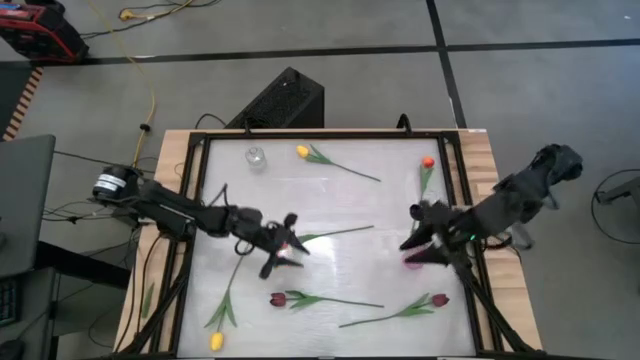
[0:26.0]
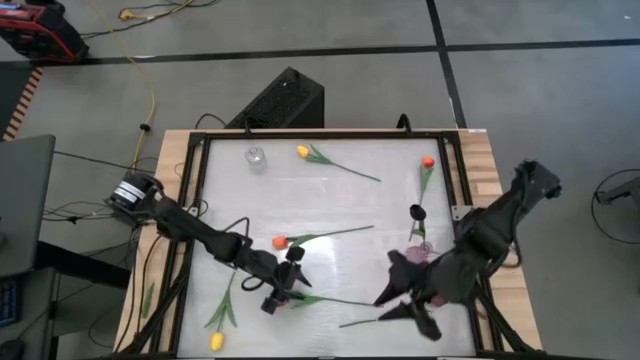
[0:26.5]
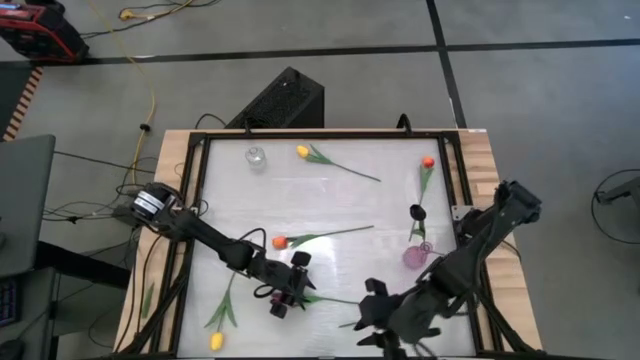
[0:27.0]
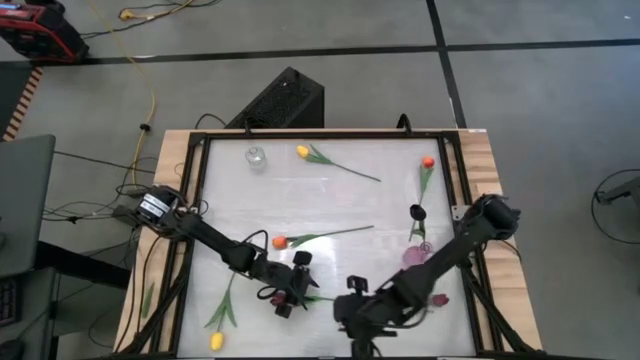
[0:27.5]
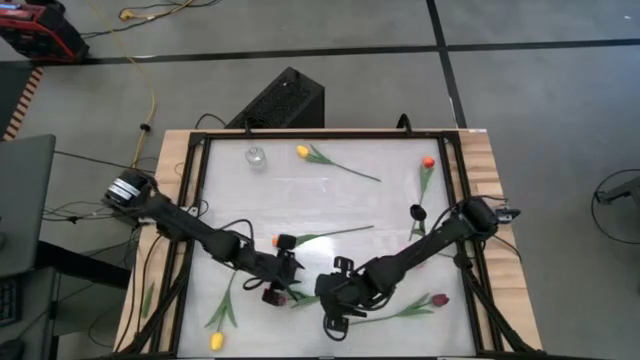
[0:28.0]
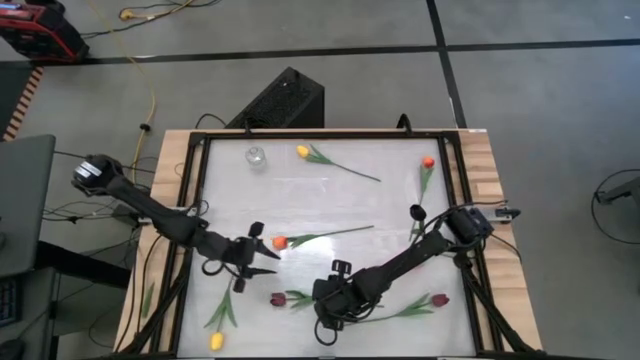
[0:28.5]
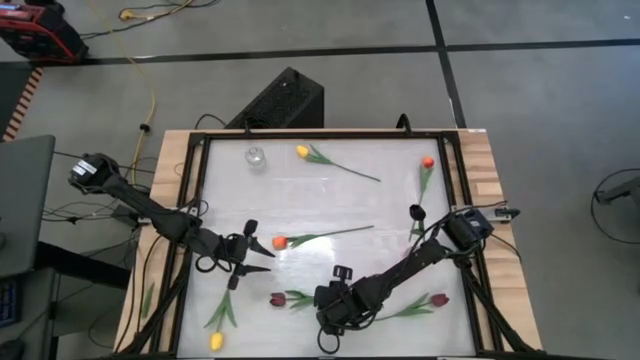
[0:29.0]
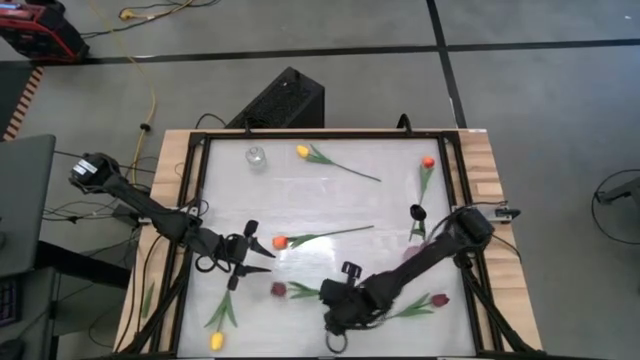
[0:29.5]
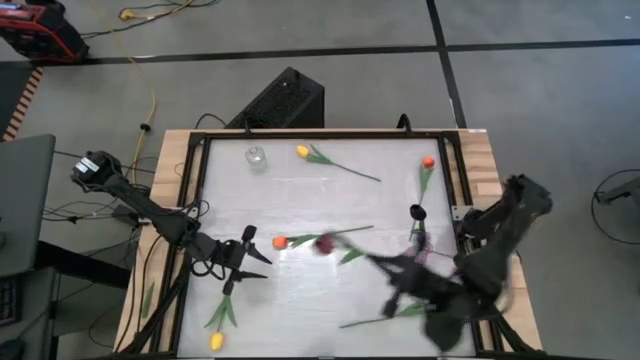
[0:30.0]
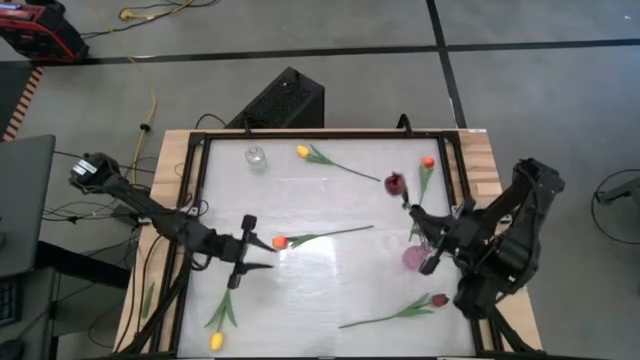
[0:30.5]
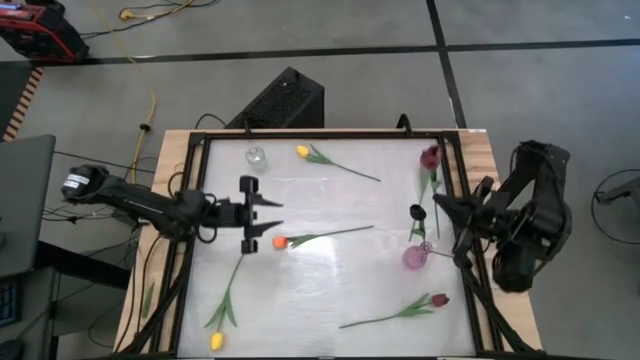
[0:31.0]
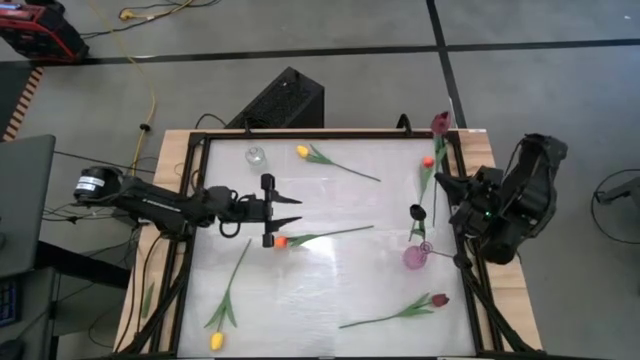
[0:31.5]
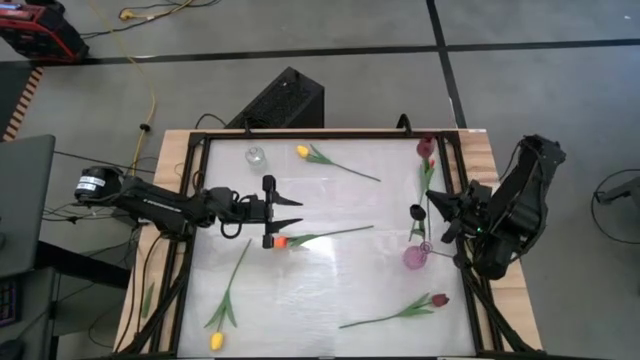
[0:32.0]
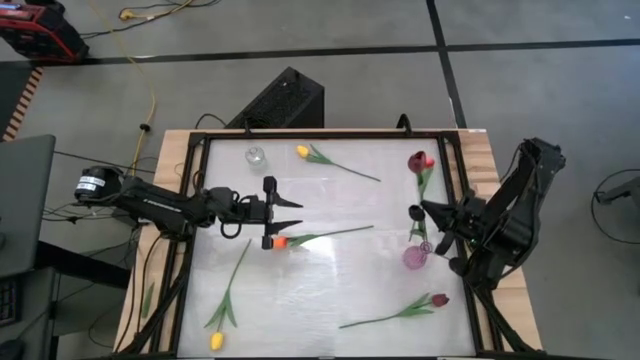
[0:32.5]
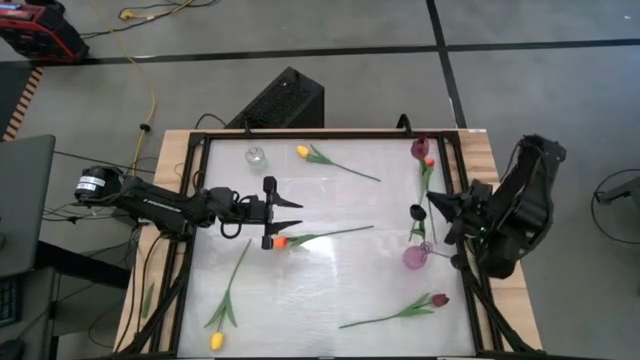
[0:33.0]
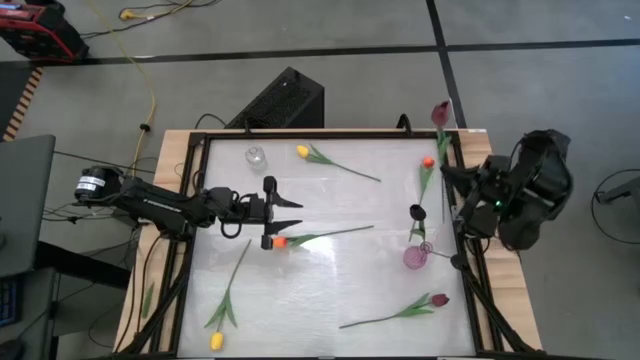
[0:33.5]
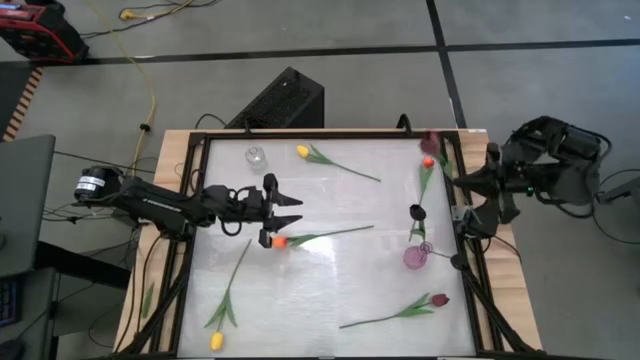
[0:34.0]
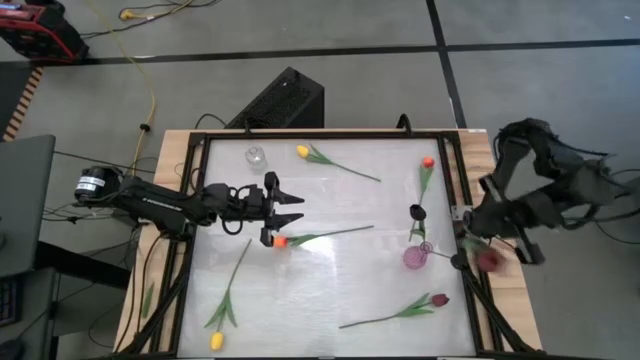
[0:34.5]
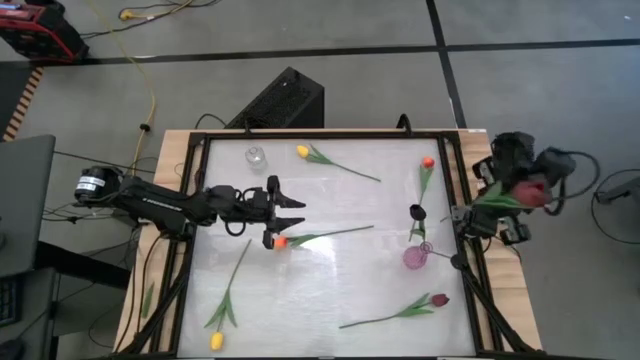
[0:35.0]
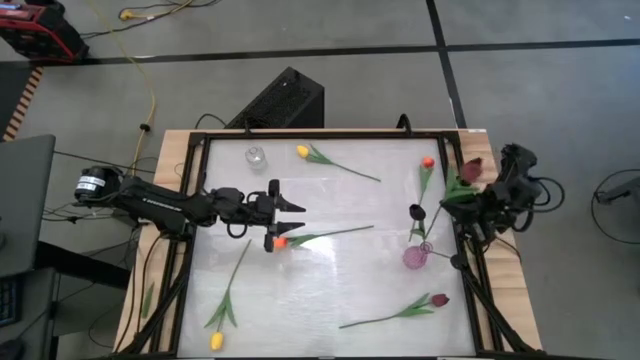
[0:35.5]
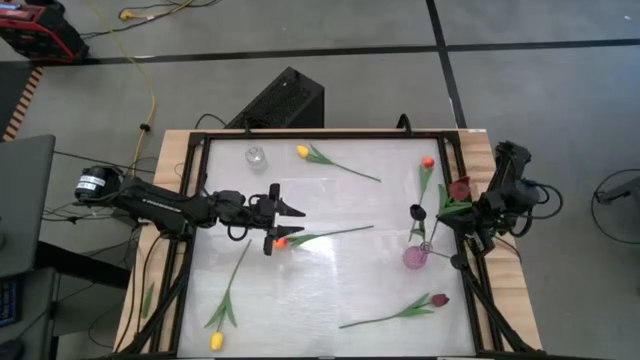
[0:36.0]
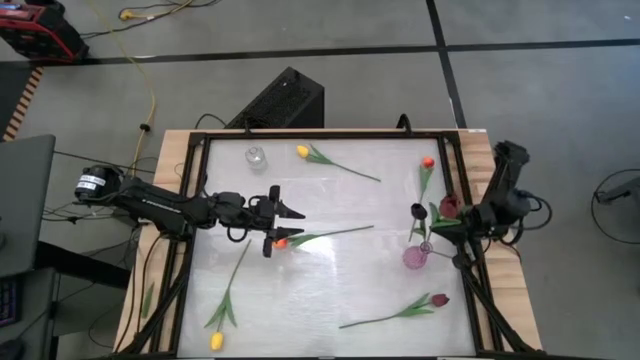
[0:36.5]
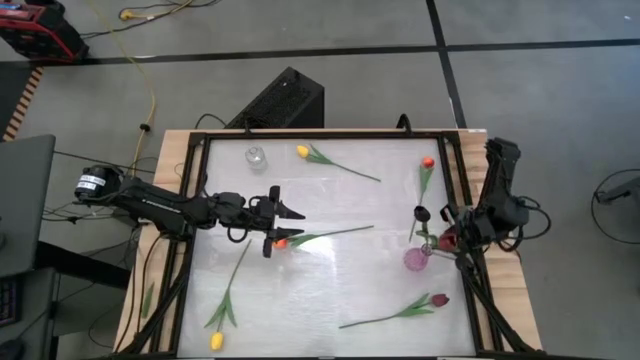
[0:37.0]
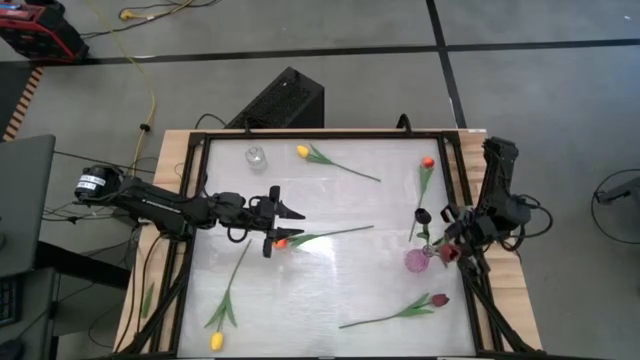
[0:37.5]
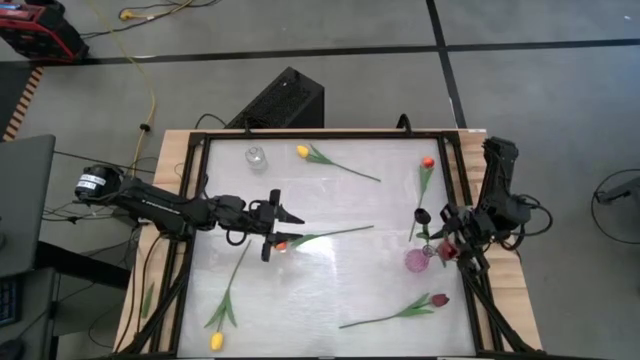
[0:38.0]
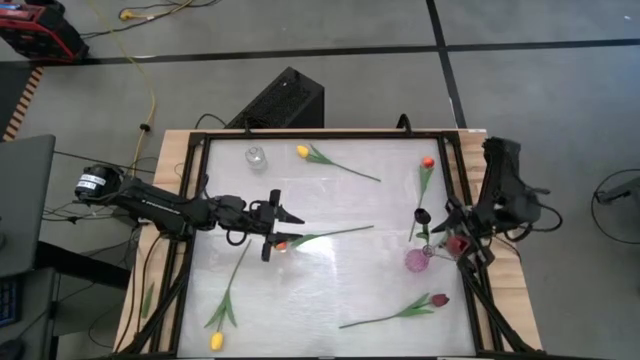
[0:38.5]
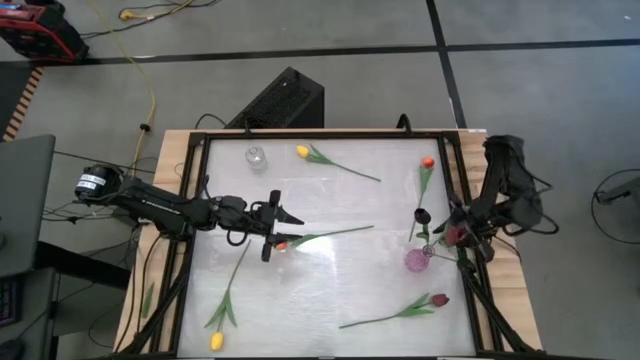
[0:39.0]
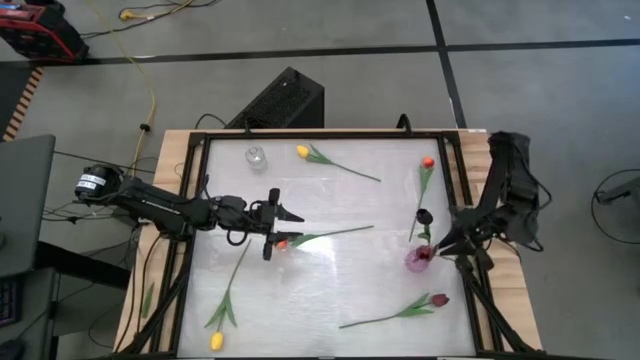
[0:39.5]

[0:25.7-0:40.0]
Task: Sort flowers into vase by color
Put the left dark red flower into the pink vase

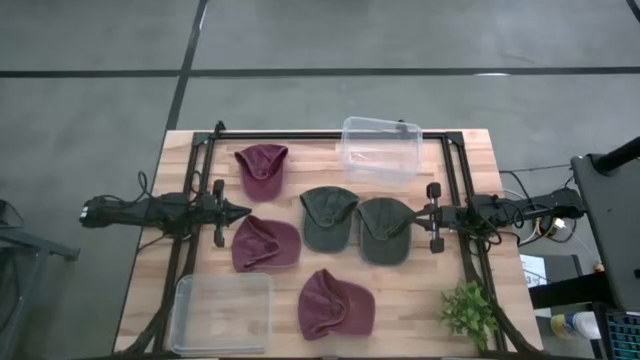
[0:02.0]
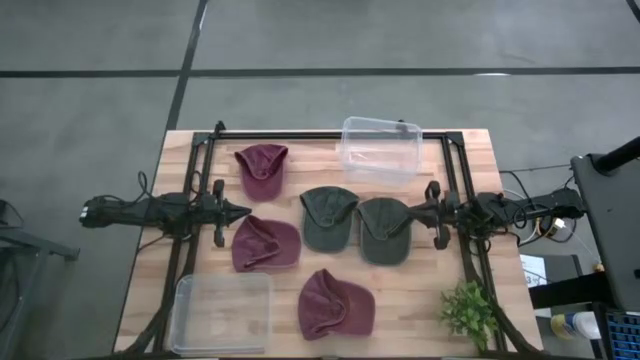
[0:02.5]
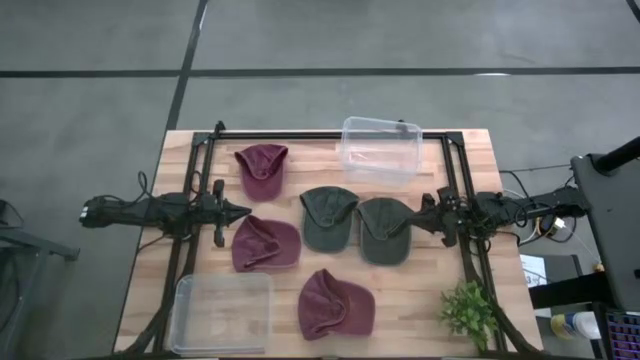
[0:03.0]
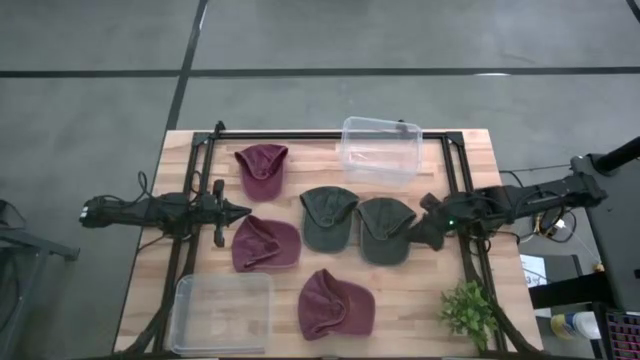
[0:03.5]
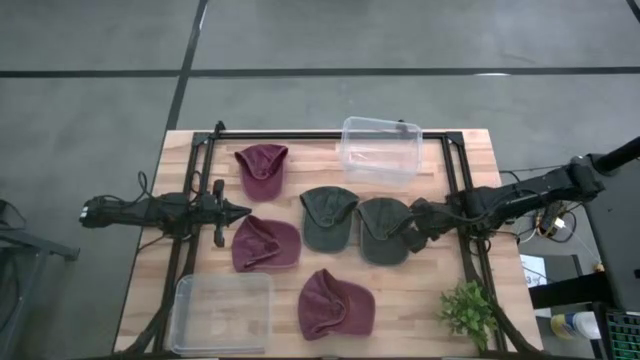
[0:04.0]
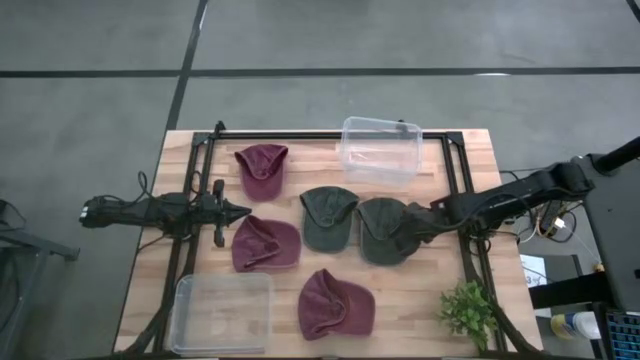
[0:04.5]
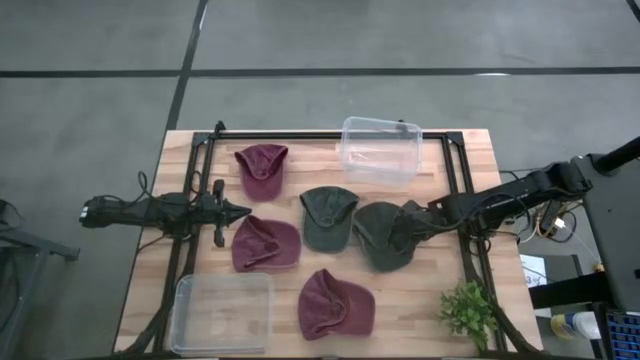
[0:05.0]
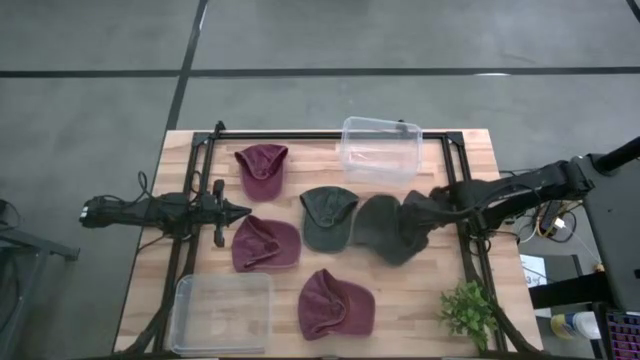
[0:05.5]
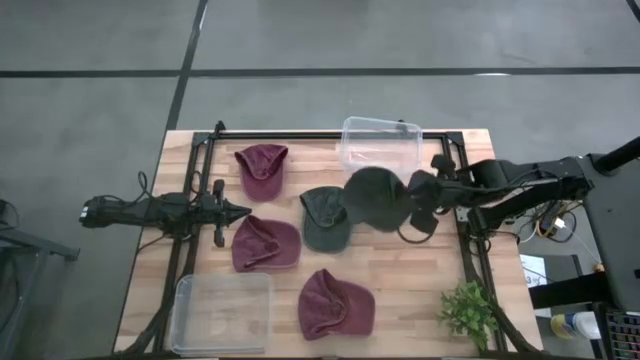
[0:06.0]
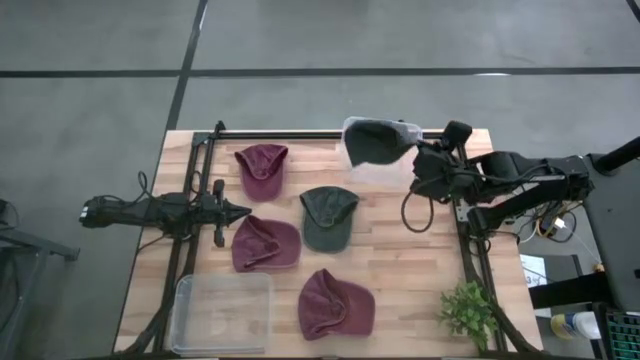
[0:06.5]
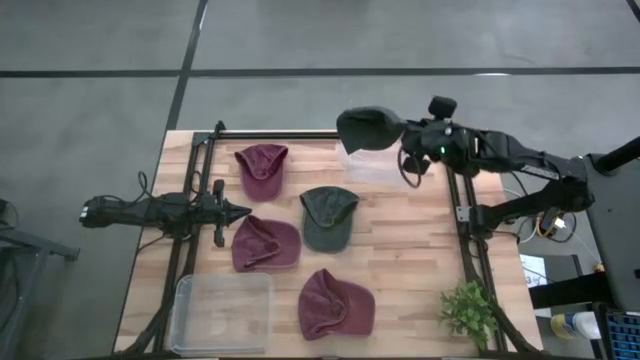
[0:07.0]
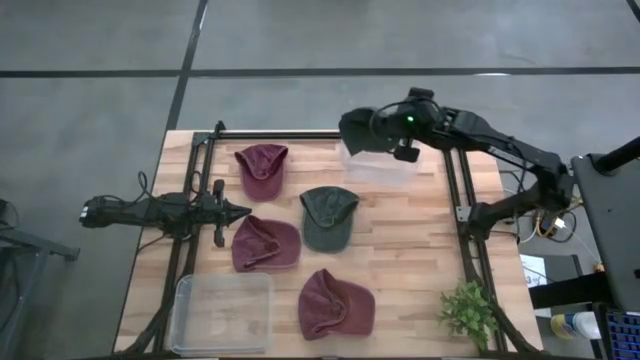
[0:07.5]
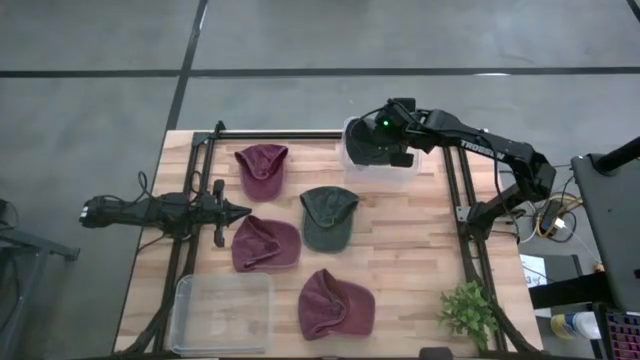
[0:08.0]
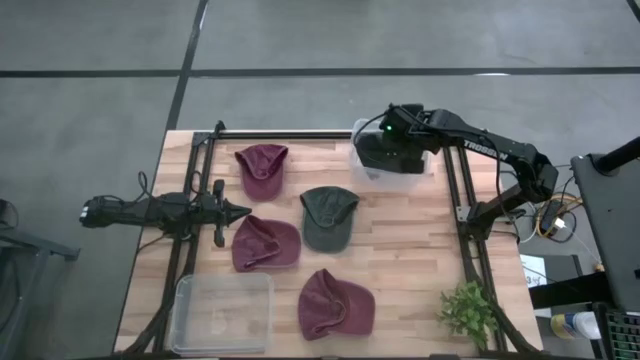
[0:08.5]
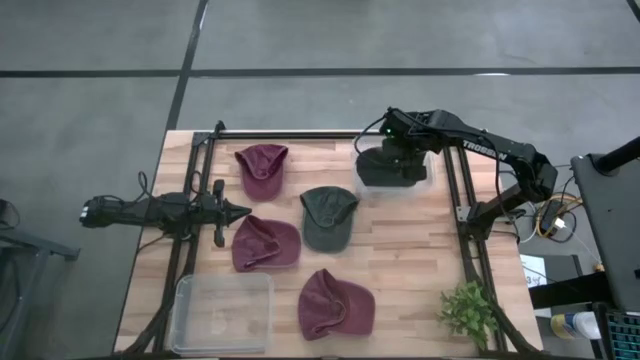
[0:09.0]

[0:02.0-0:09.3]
Task: Pick & Place hat
Put the right gray cap into the top transparent bin
